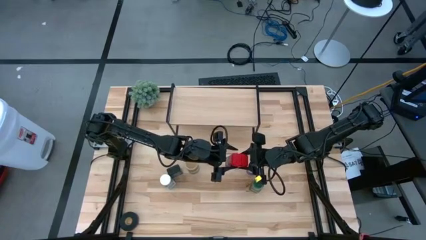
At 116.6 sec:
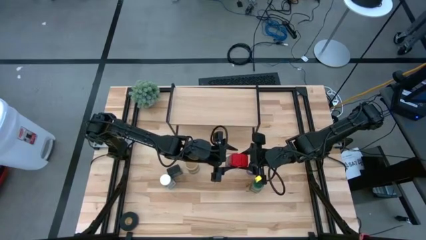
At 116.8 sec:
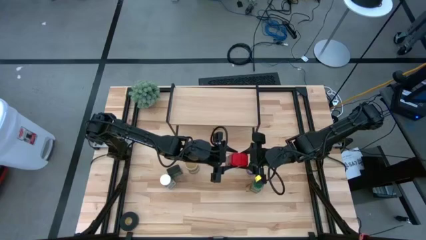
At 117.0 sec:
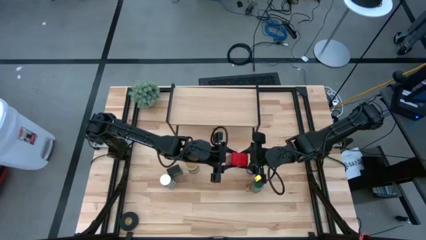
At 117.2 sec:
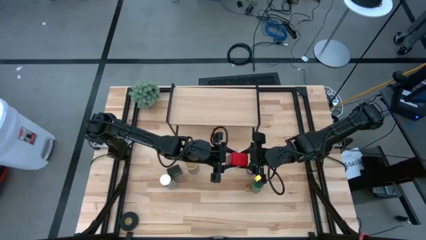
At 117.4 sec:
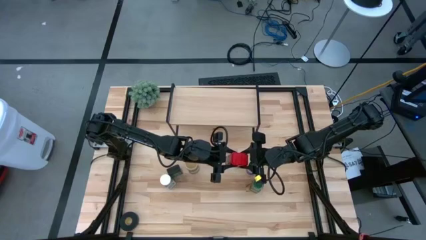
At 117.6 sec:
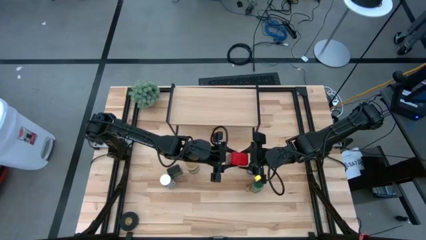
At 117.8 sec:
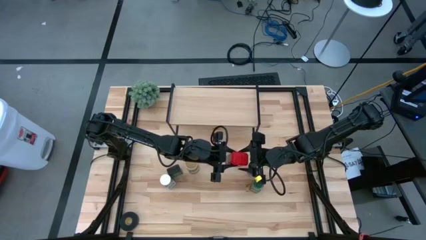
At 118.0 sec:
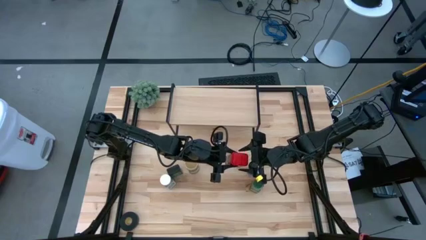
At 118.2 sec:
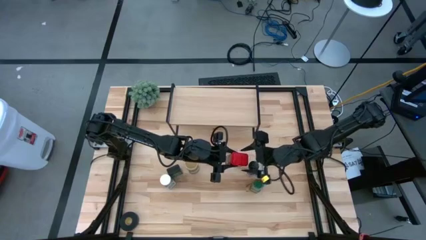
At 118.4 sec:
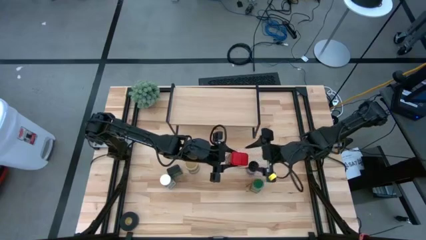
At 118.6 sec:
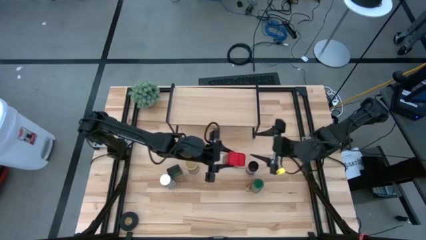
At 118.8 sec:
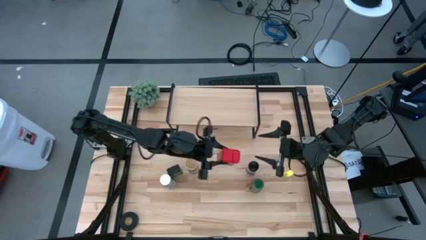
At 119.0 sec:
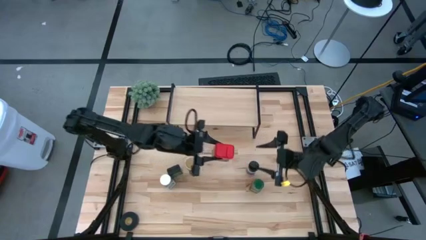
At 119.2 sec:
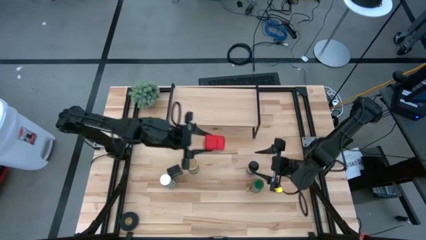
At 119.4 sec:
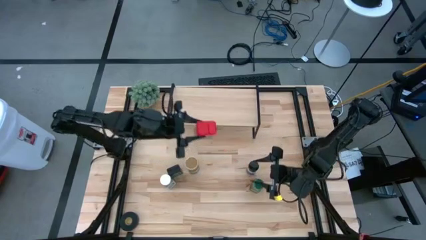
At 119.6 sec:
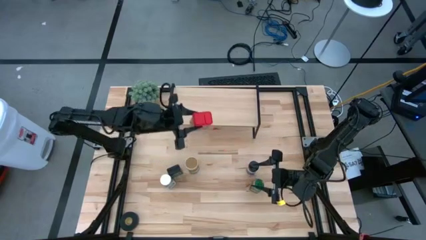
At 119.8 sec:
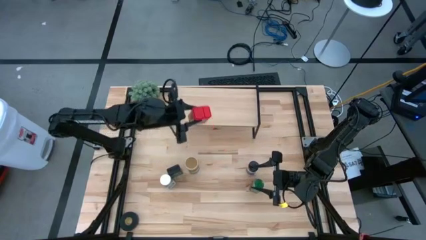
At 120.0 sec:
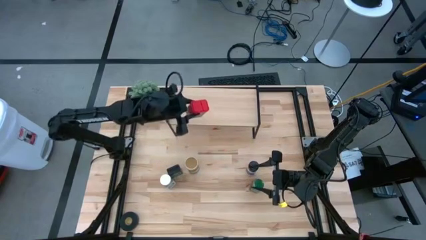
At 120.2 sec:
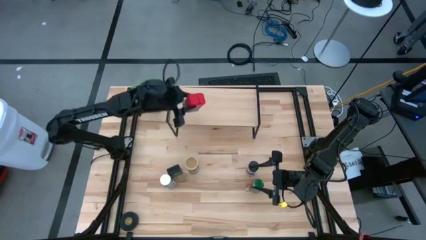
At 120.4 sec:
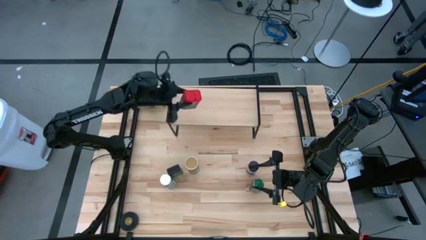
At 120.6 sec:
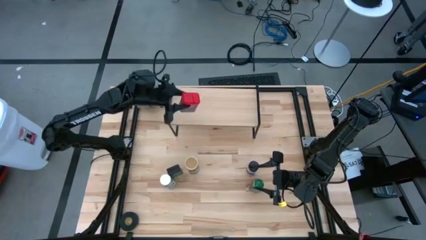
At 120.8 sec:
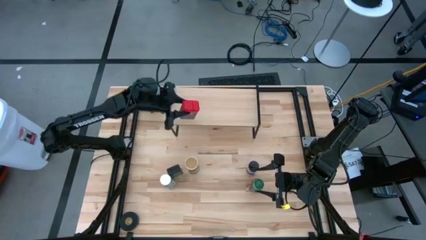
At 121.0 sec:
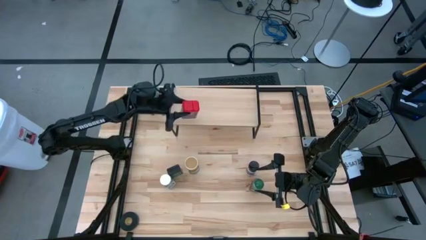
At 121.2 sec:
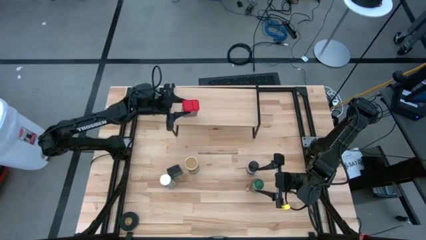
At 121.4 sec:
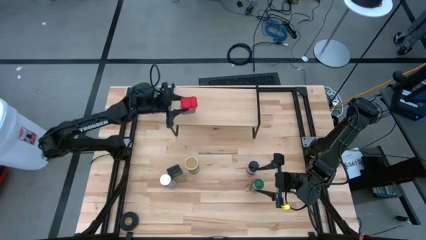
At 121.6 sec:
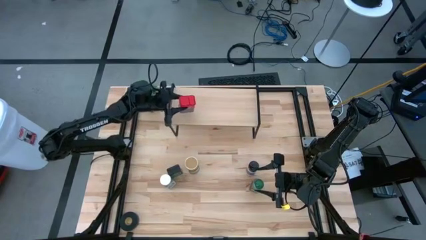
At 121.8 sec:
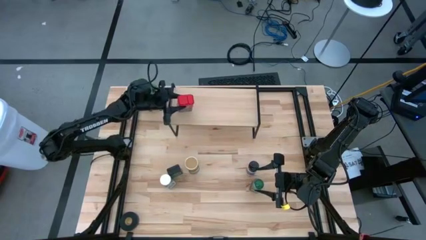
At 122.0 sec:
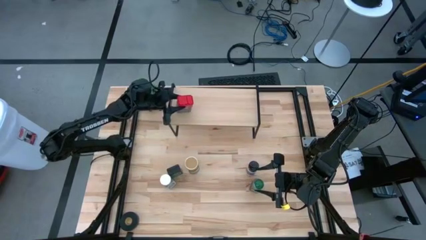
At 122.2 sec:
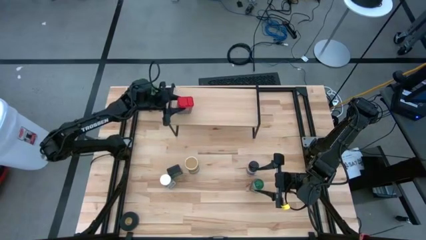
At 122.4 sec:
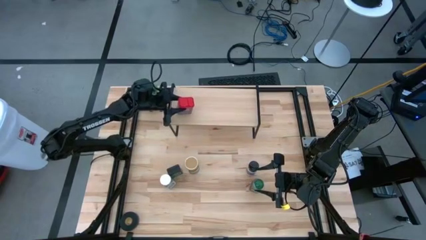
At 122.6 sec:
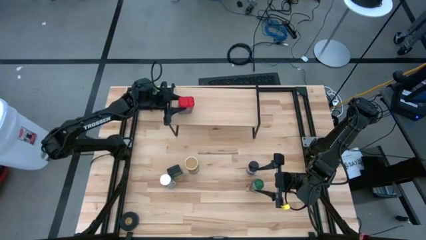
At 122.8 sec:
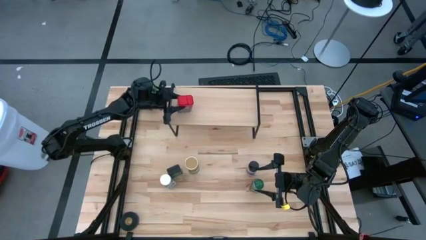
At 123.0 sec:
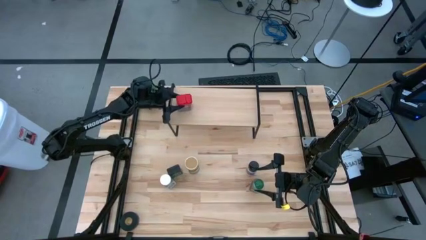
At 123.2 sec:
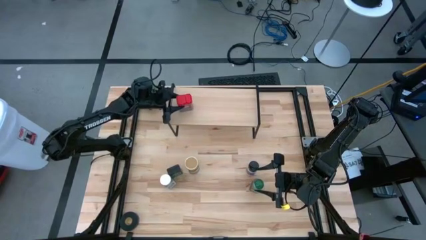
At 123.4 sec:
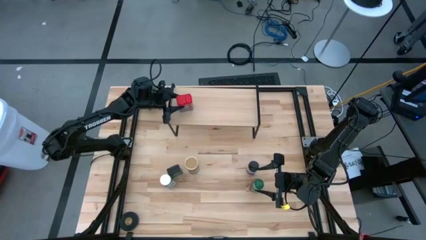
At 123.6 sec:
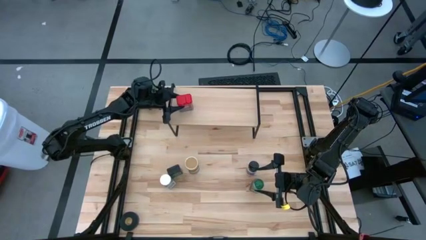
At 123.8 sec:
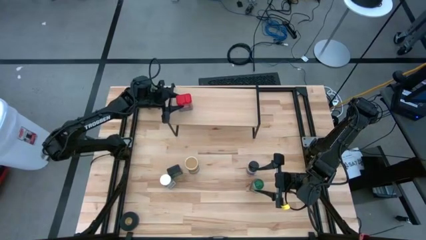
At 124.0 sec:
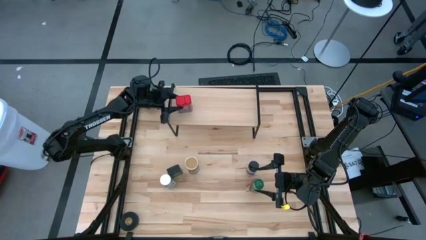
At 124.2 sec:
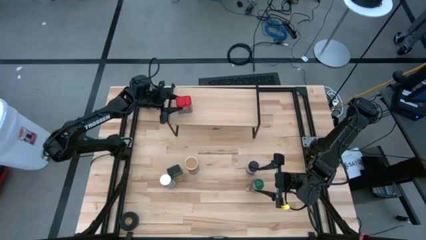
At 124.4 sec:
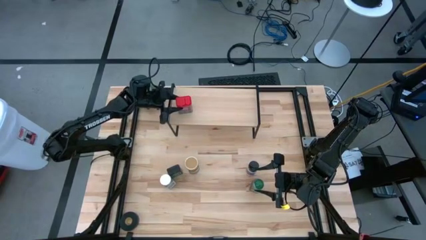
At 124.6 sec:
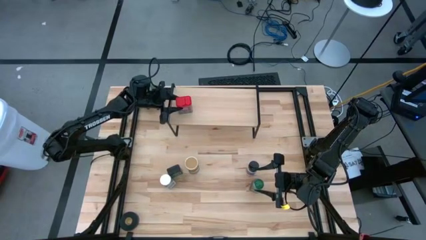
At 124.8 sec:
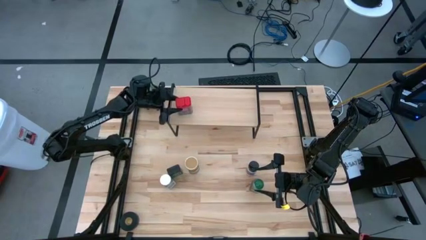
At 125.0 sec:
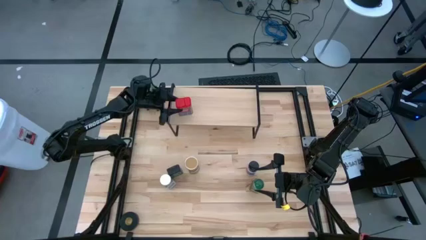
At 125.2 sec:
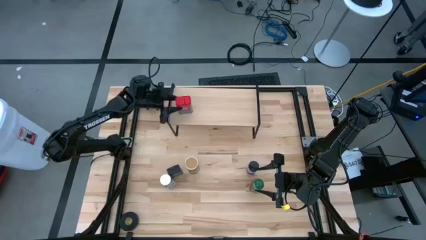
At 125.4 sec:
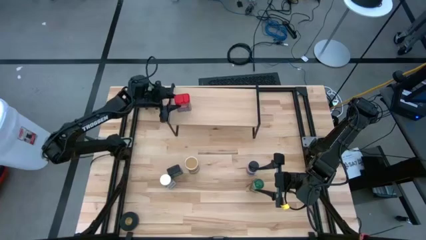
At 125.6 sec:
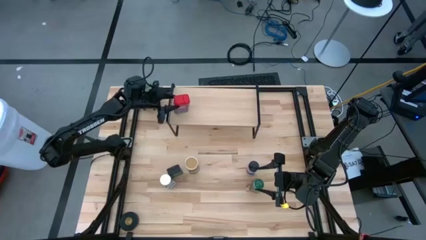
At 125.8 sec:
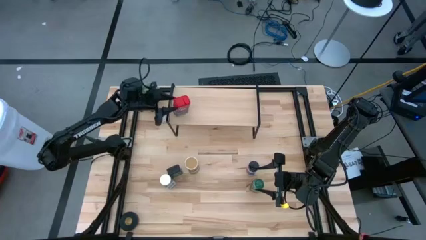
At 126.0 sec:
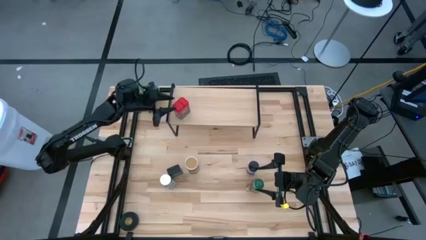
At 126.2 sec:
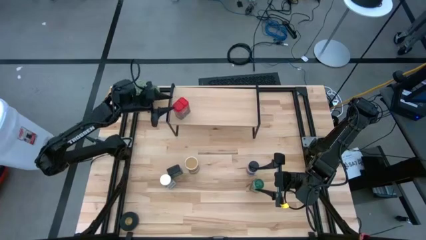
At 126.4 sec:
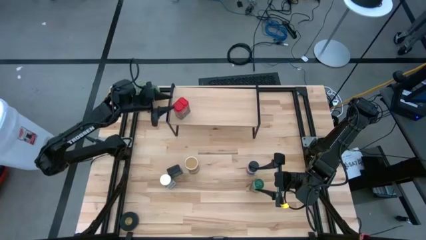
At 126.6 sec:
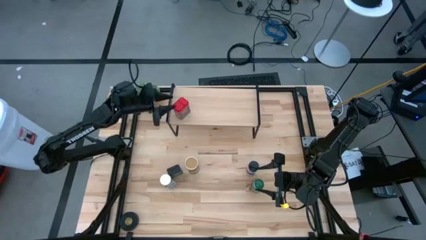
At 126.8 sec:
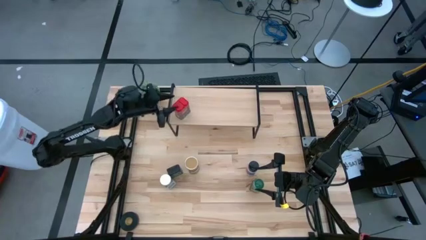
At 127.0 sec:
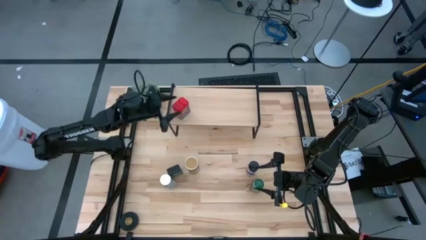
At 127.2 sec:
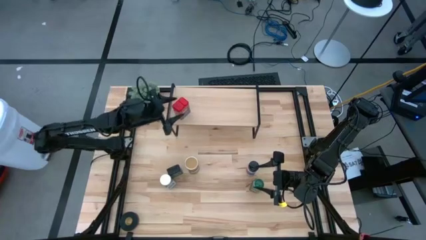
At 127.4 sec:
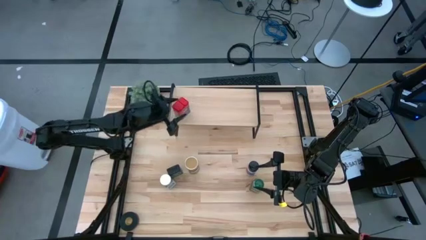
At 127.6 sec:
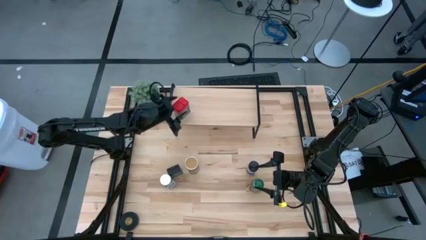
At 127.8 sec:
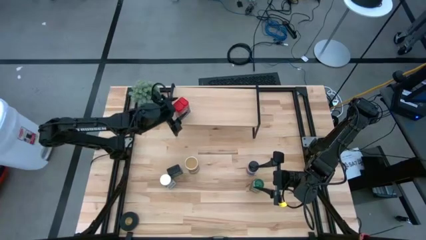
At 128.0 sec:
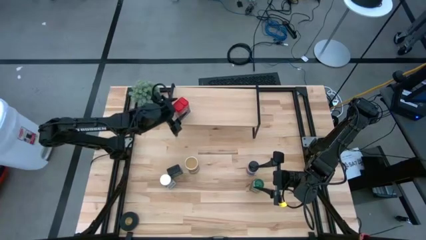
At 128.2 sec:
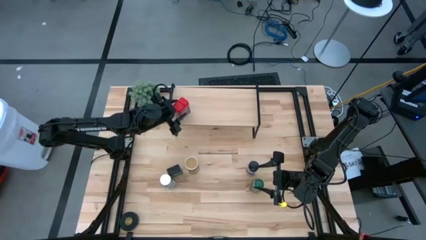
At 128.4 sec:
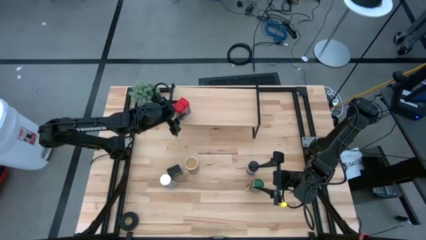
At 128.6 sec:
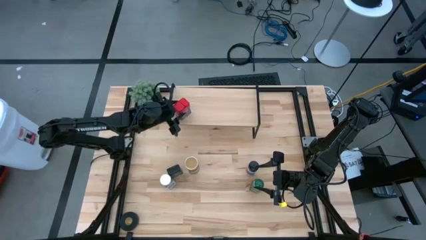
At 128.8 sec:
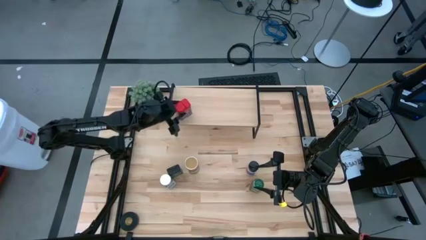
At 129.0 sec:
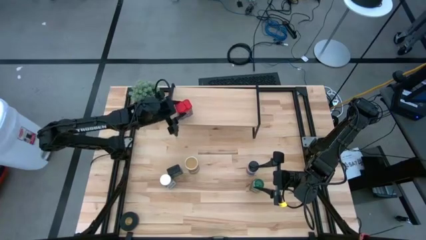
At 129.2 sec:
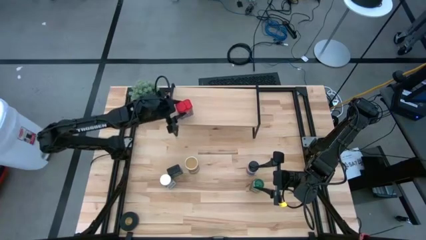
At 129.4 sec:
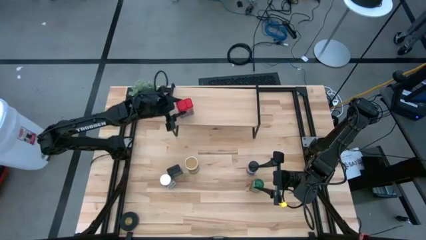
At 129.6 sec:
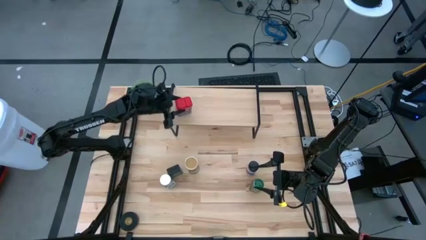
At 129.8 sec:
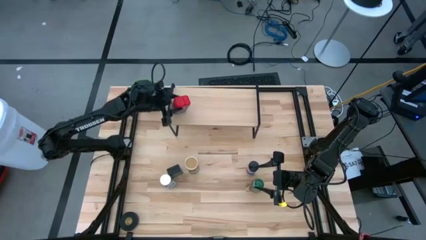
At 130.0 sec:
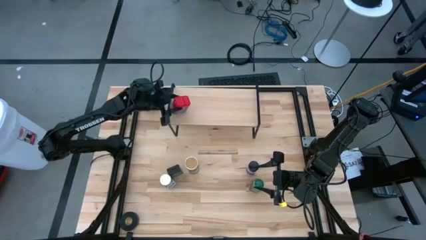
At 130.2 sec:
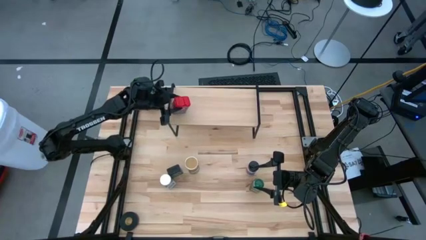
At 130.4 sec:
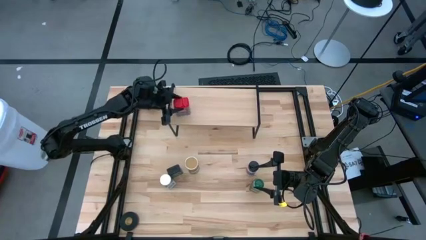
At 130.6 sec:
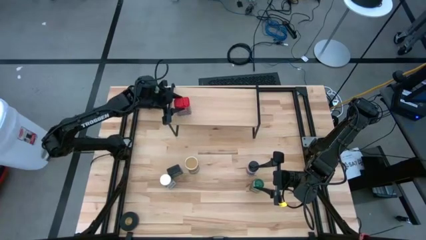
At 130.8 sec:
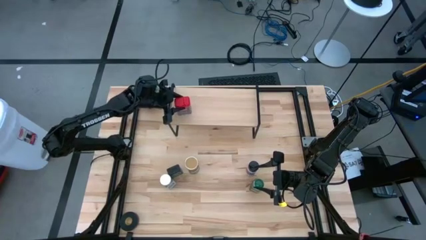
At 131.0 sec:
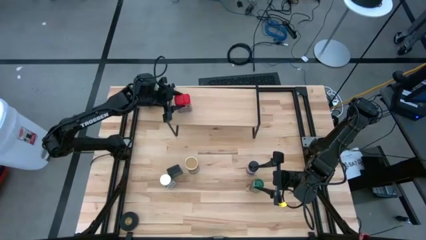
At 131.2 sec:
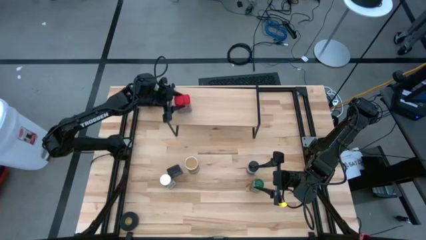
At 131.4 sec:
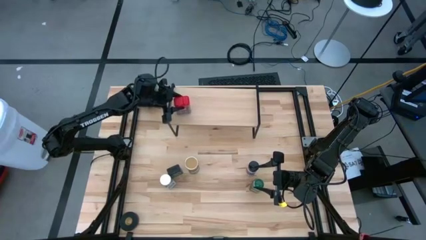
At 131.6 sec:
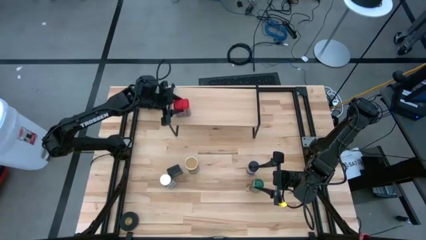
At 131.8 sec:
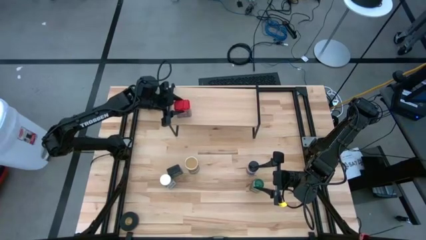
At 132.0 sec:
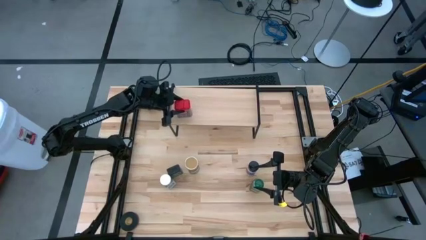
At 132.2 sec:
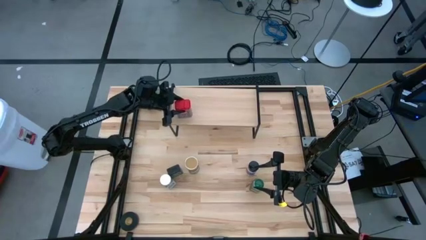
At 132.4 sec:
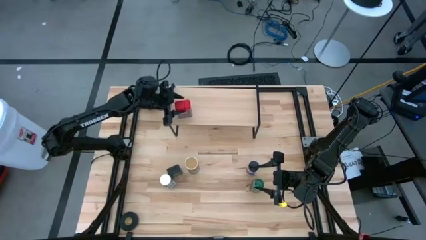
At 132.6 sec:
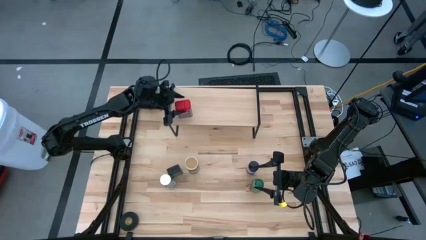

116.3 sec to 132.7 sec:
Task: Shelf spices
Put the red seasoning can on the shelf
